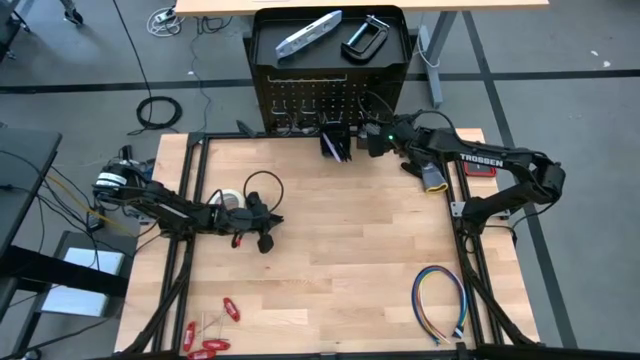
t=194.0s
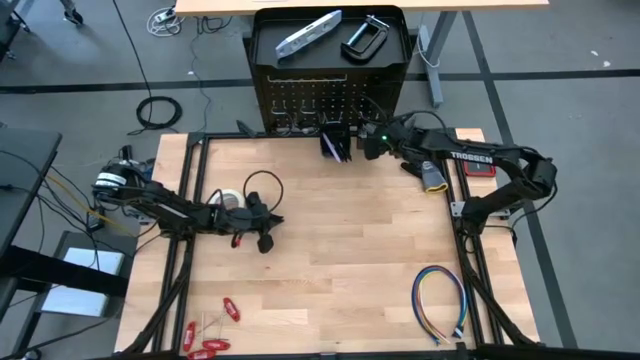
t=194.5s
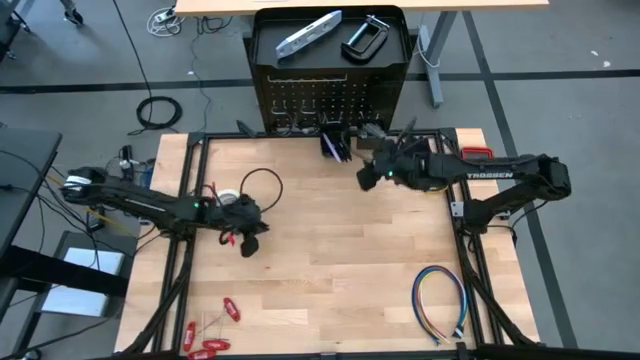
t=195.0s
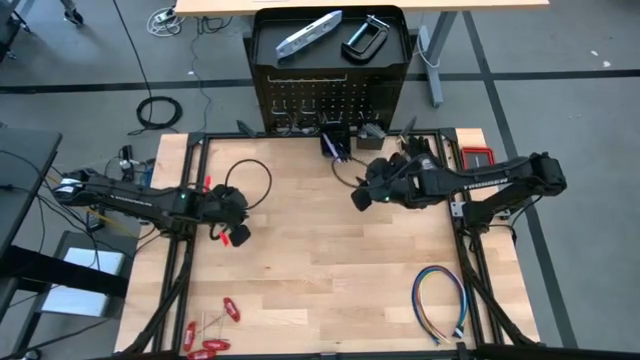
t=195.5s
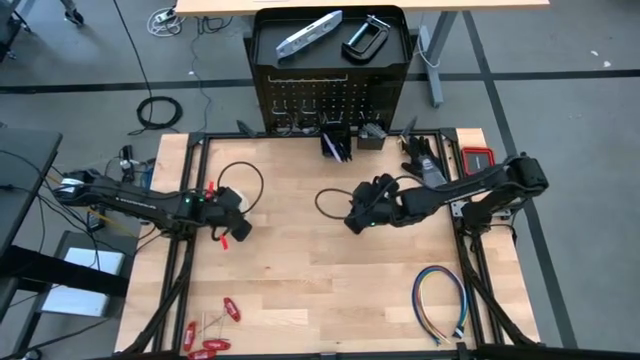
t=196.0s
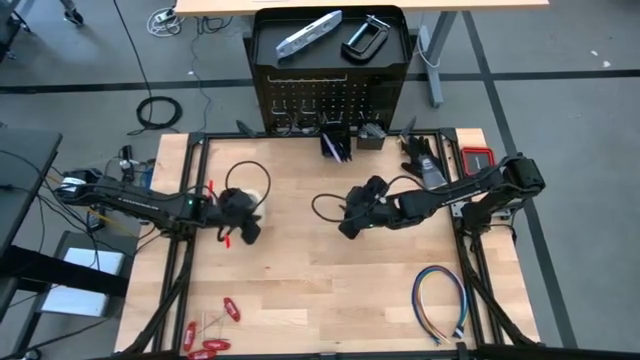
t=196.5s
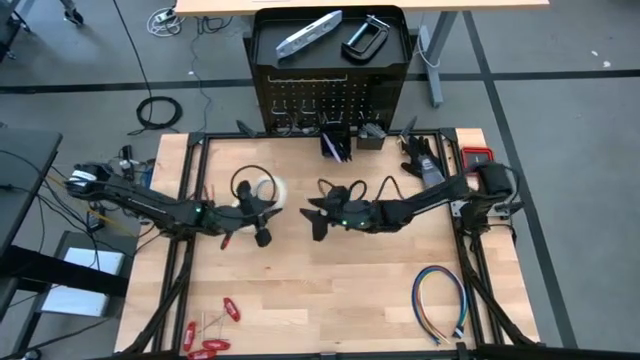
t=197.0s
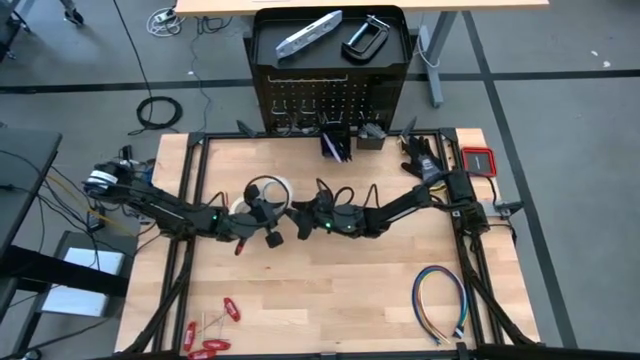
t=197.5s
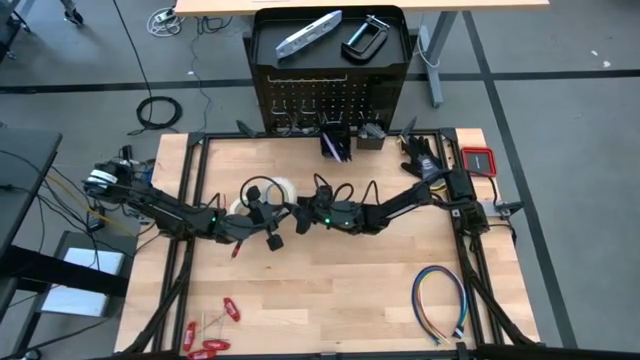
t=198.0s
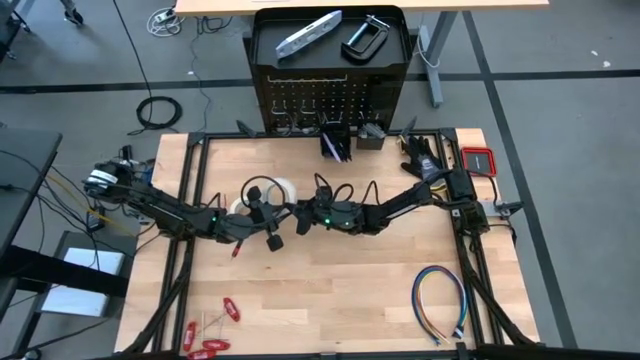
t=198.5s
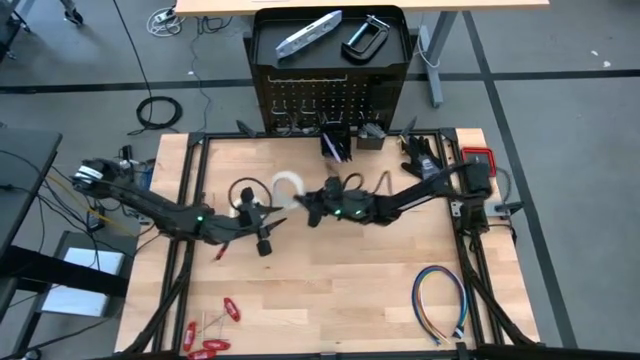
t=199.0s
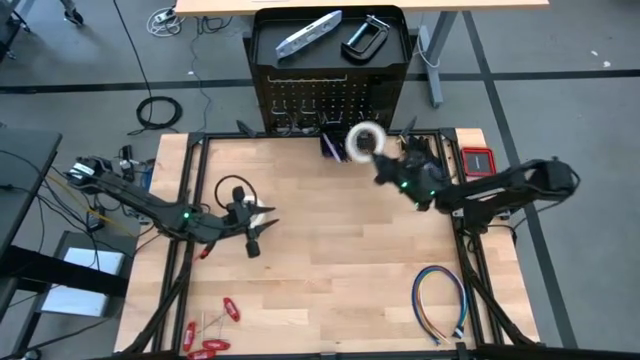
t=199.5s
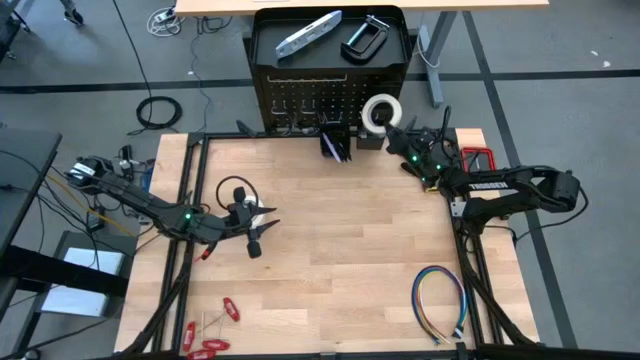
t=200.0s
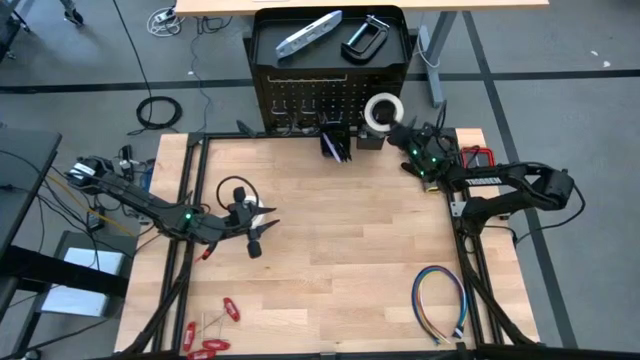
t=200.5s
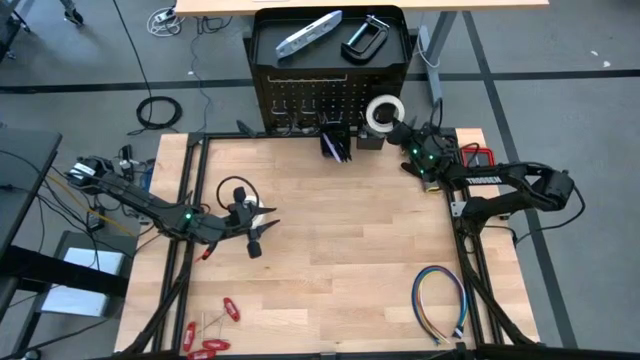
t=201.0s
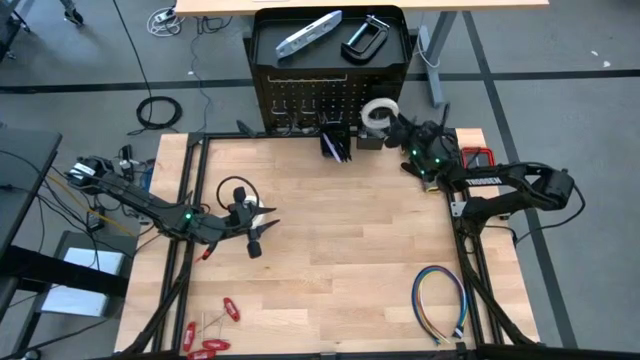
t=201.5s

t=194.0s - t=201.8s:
Task: Hang tools onto peg board
Hang the white masking tape on the peg board

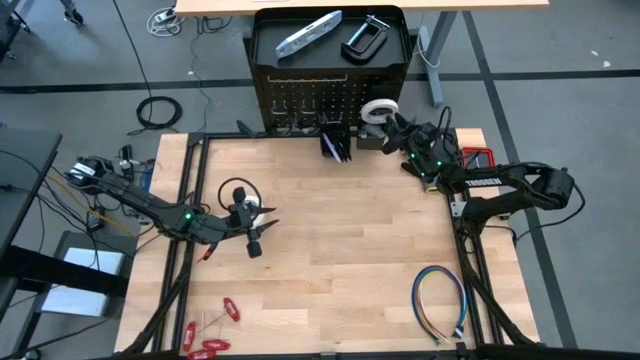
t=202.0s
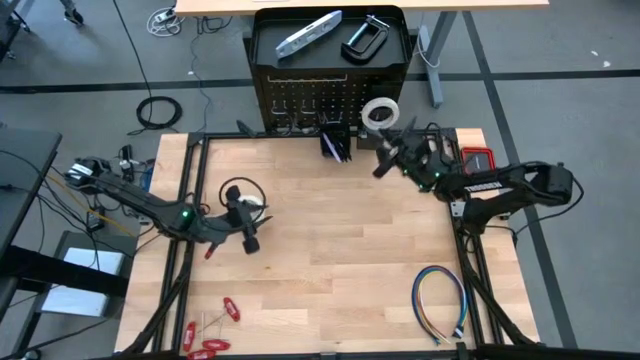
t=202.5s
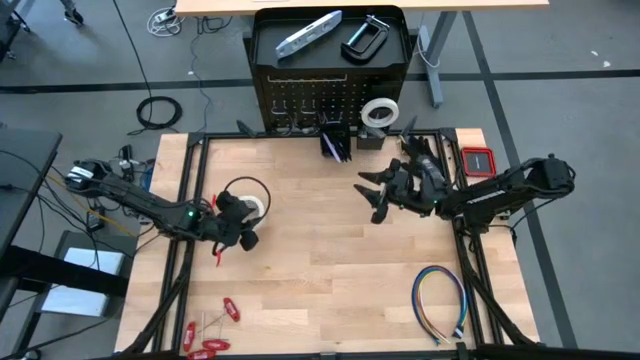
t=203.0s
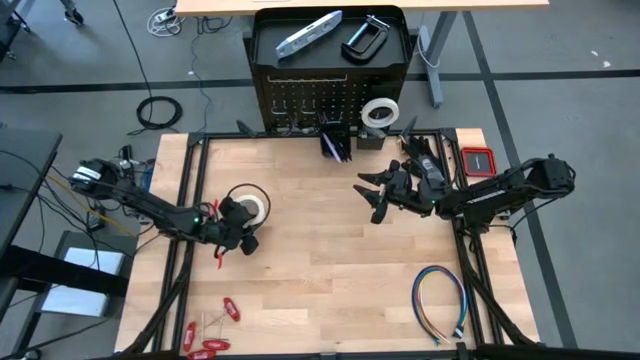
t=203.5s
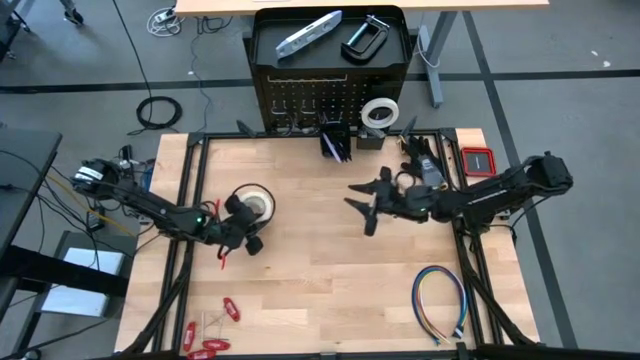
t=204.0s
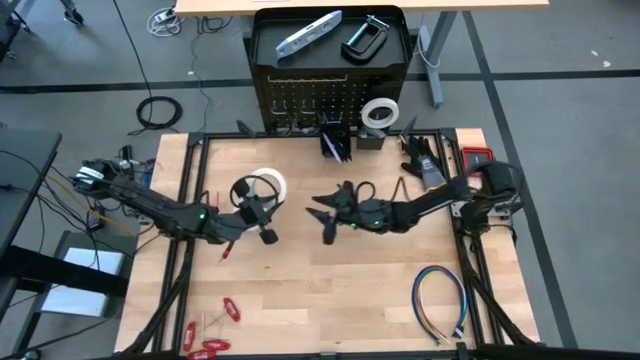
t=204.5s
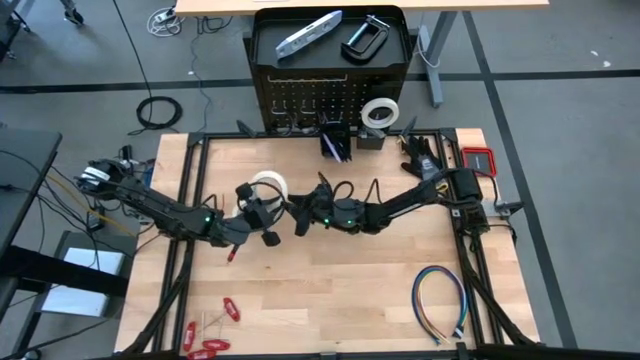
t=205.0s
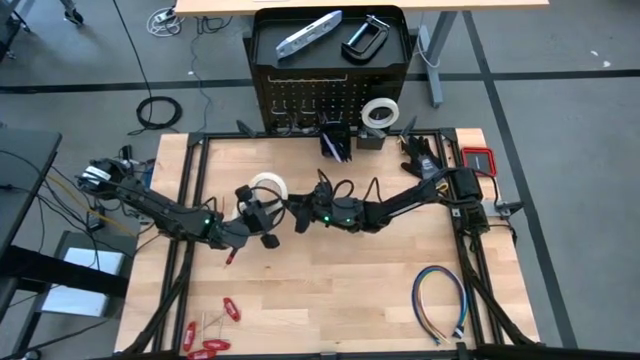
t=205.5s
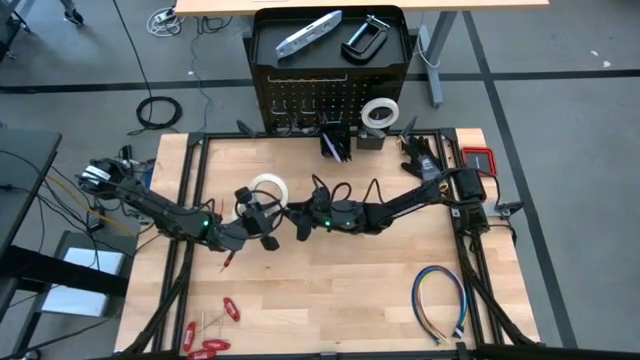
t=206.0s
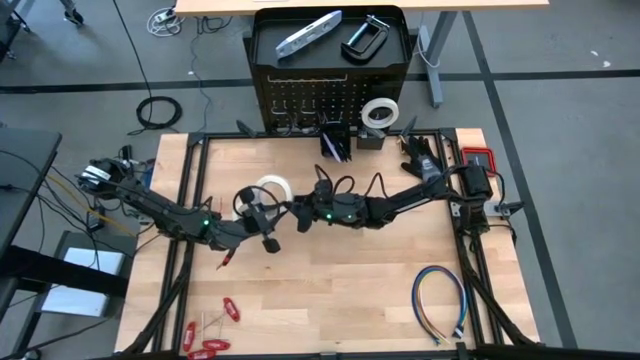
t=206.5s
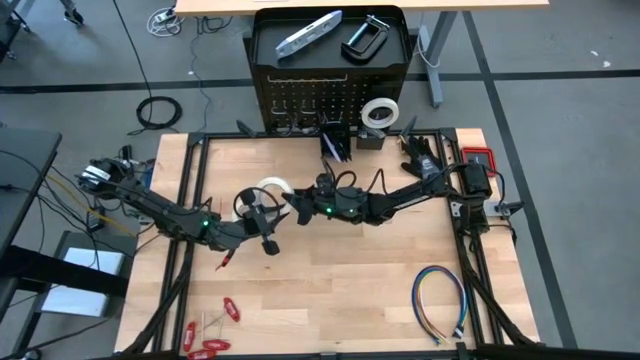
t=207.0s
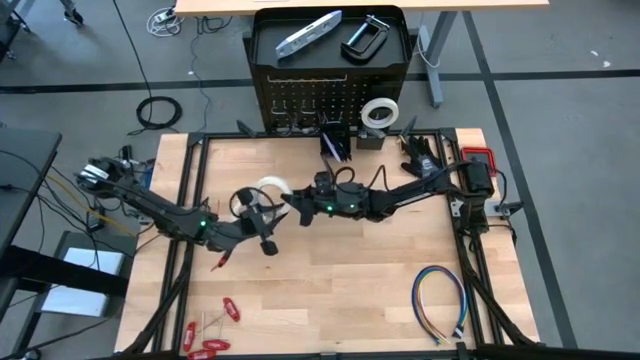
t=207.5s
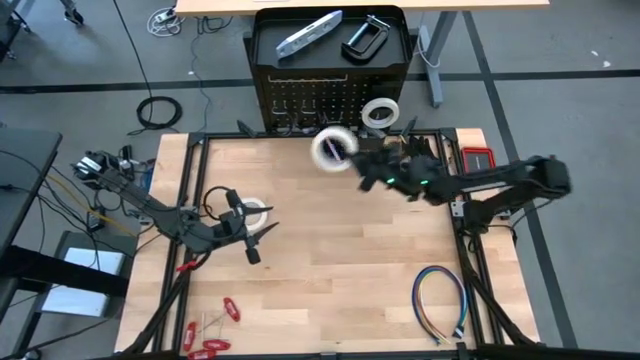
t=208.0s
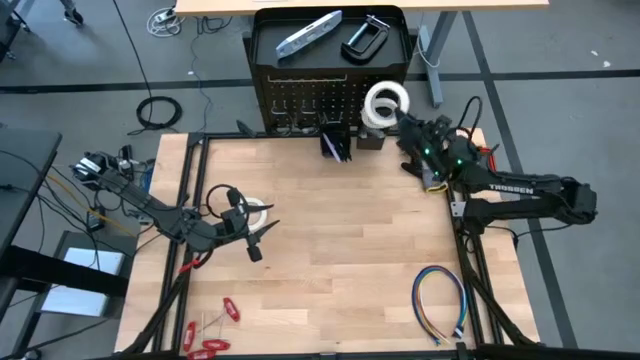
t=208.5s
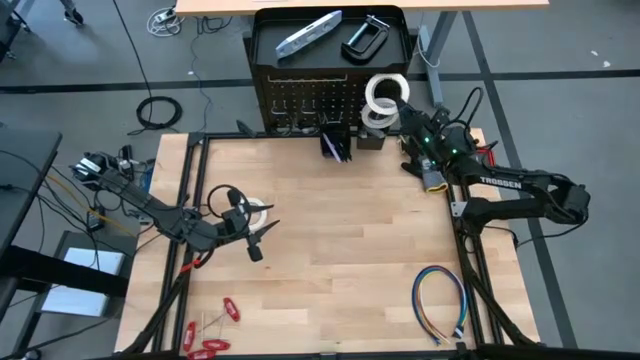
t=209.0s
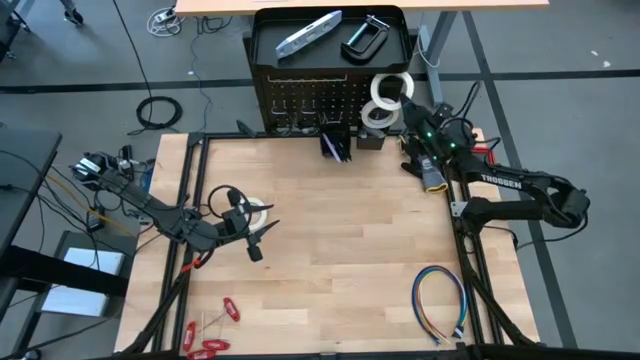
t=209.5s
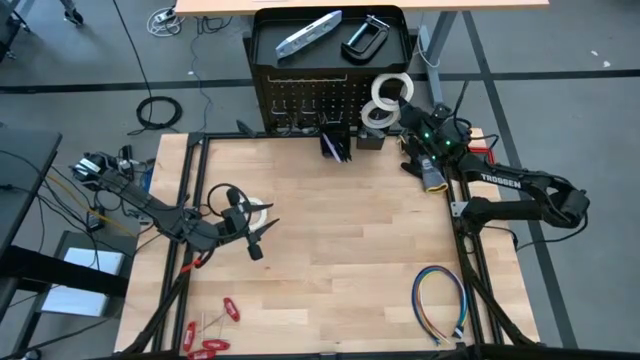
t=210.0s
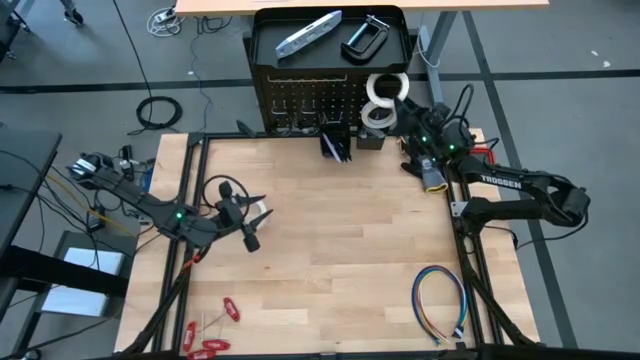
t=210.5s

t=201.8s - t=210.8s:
Hang the white masking tape on the peg board

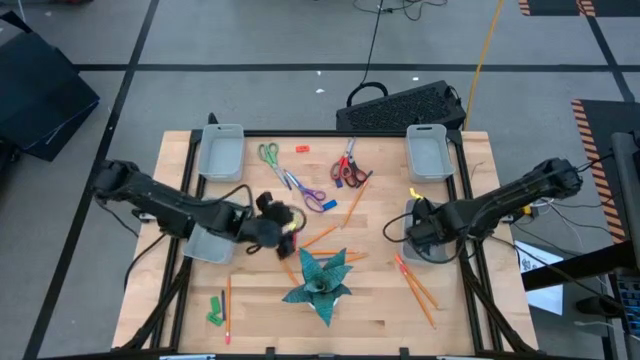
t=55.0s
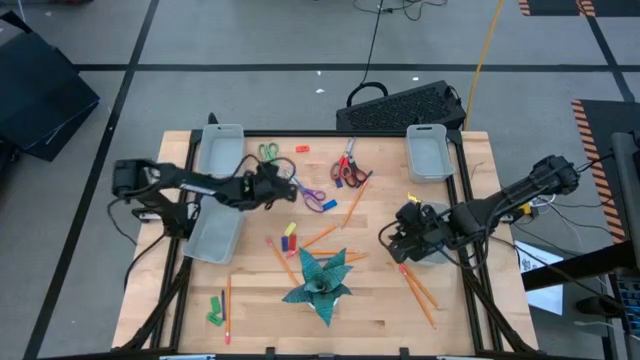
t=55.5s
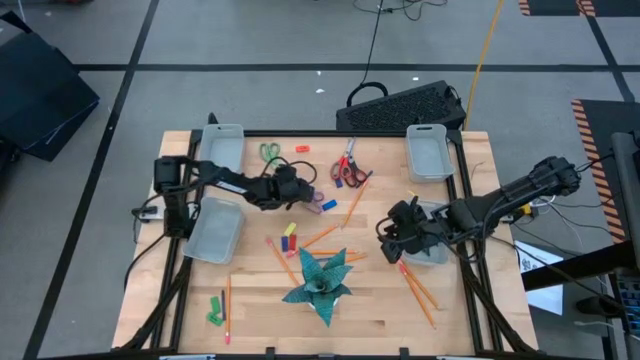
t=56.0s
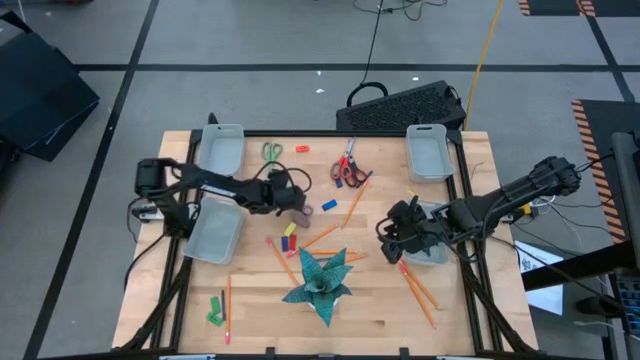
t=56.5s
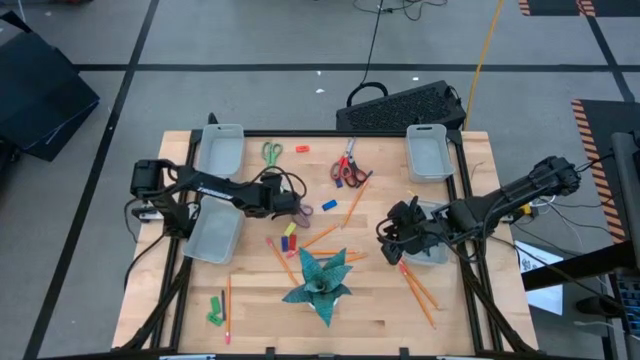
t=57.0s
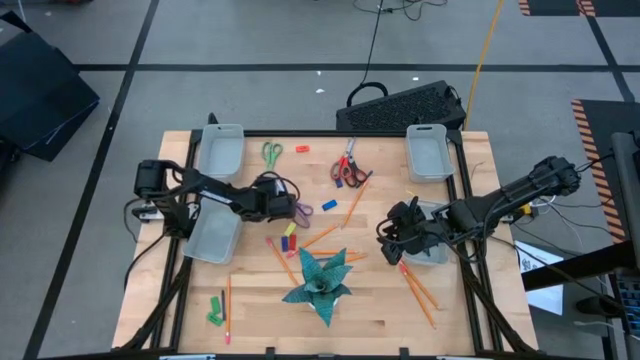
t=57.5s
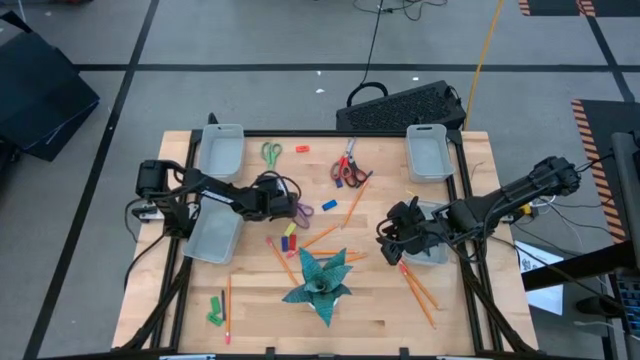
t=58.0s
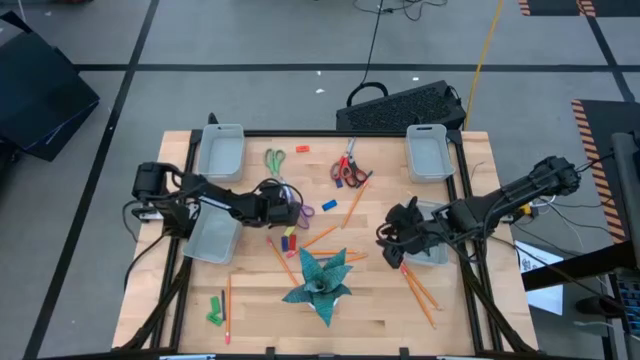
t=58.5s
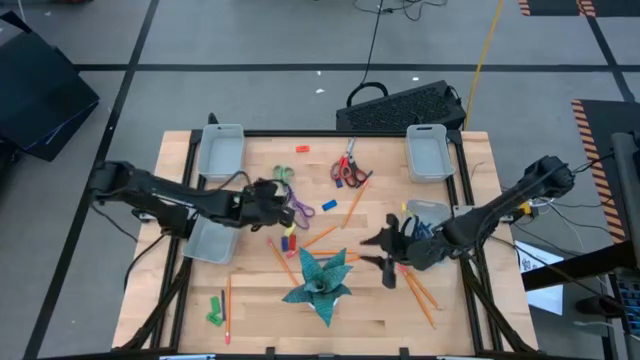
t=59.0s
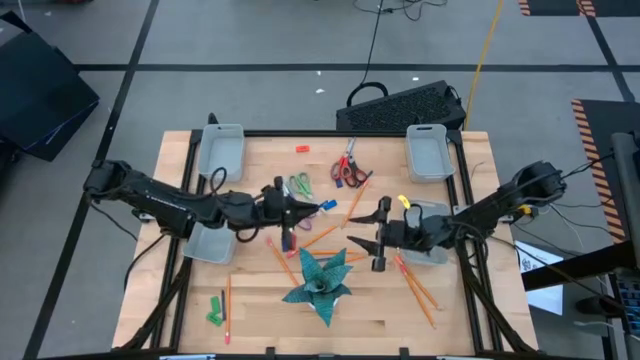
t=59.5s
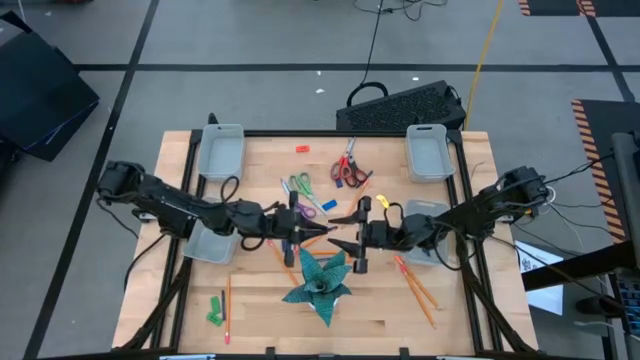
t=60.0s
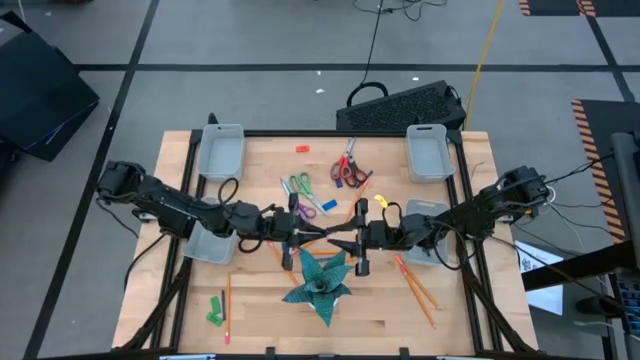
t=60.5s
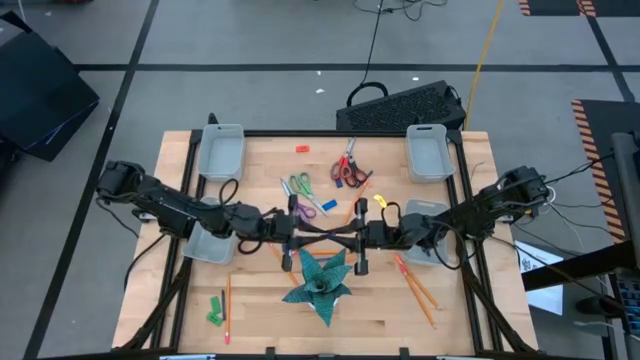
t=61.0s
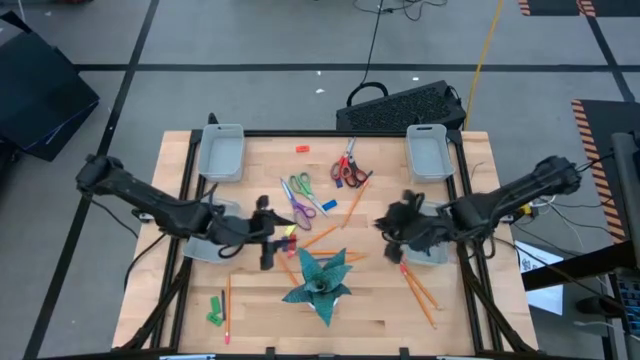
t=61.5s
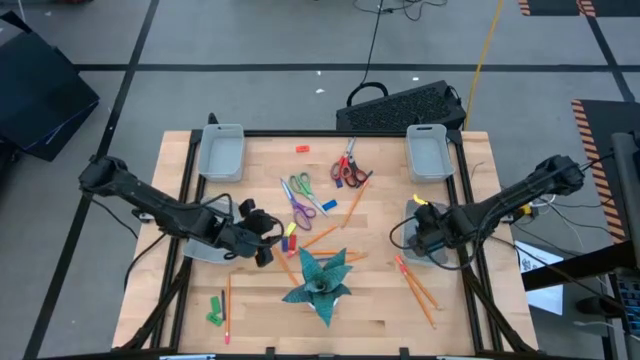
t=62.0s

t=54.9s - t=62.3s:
Task: Sort crayons/erasers/pens/pencils in bins
Put the blue crayon into the bottom right gray bin
